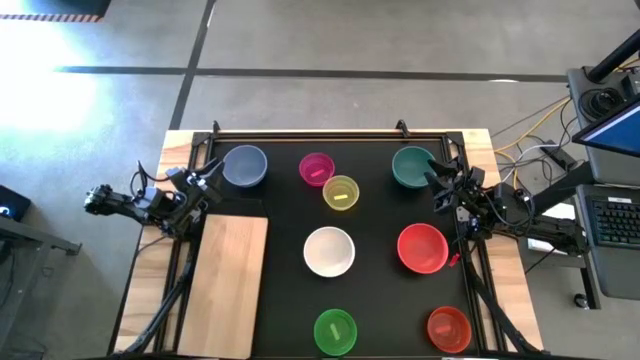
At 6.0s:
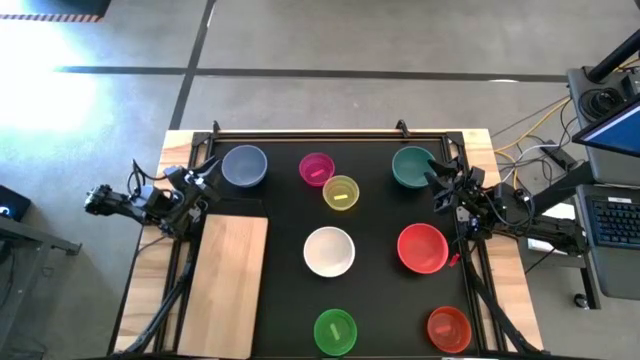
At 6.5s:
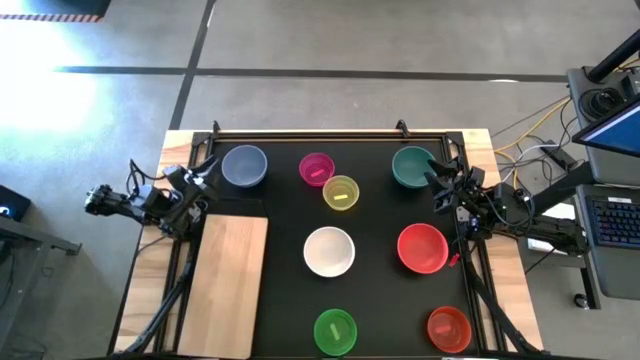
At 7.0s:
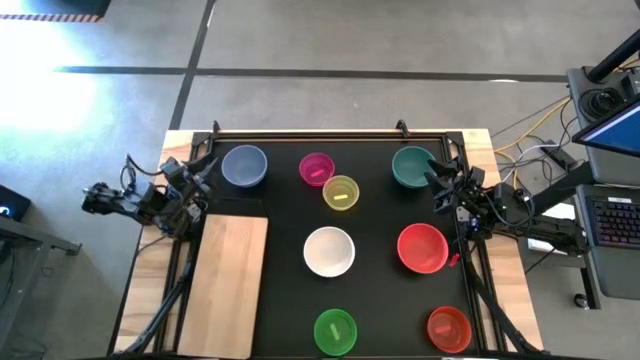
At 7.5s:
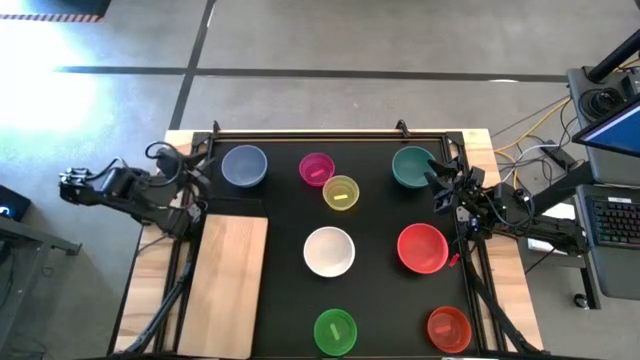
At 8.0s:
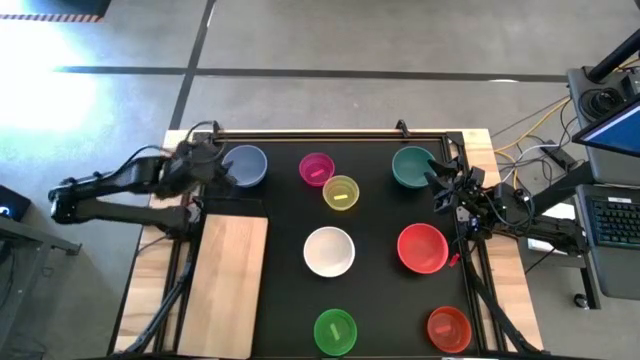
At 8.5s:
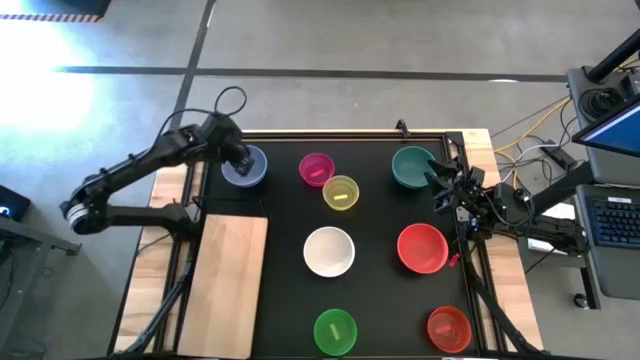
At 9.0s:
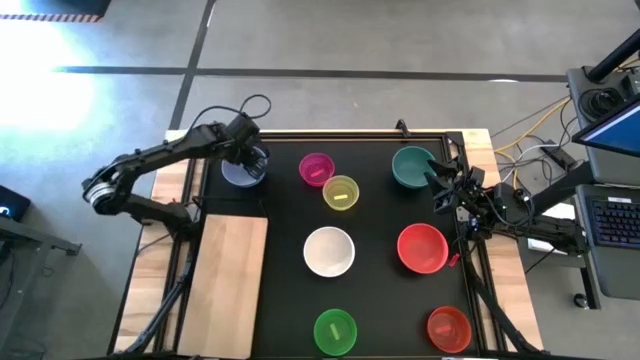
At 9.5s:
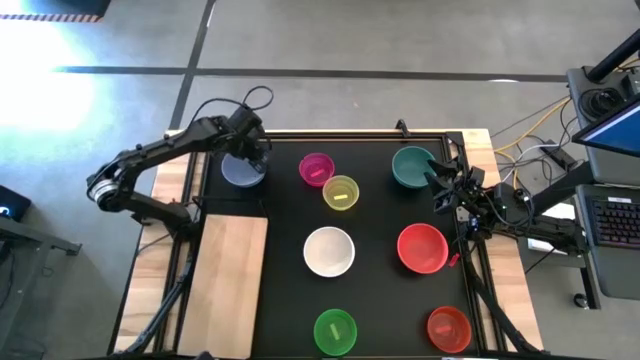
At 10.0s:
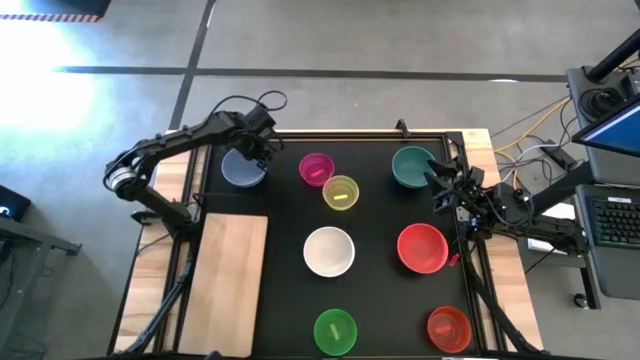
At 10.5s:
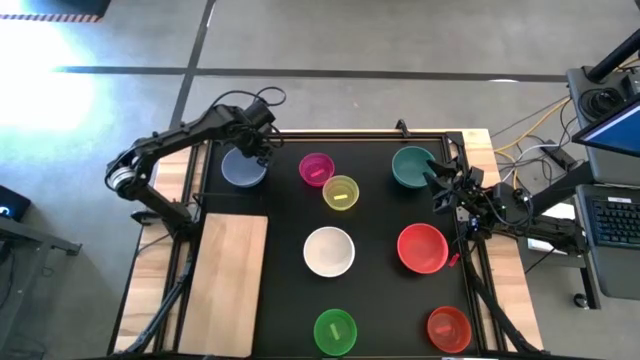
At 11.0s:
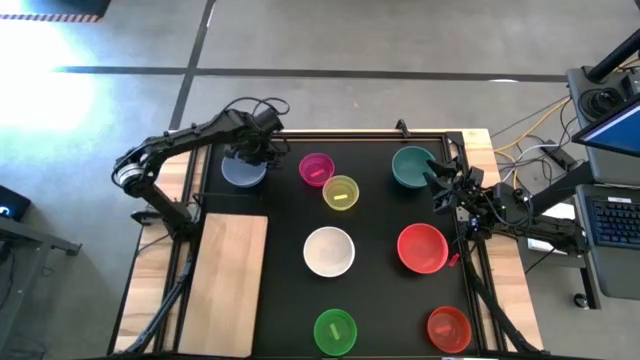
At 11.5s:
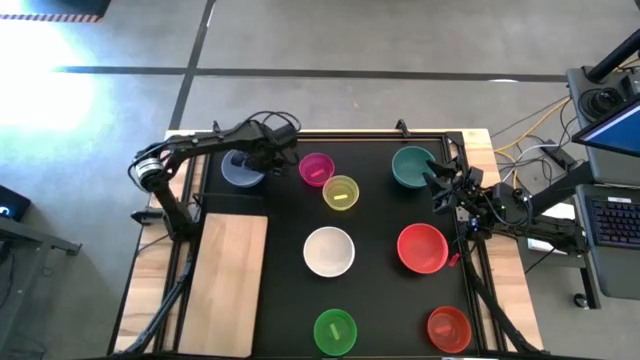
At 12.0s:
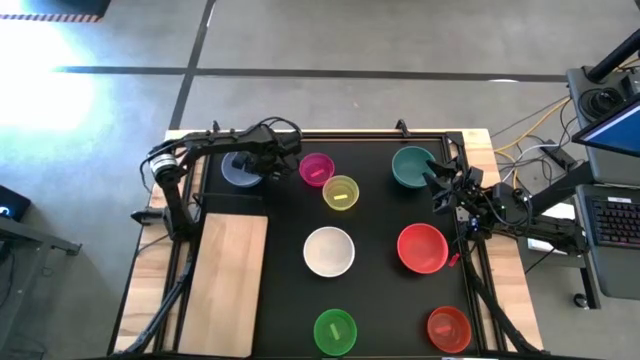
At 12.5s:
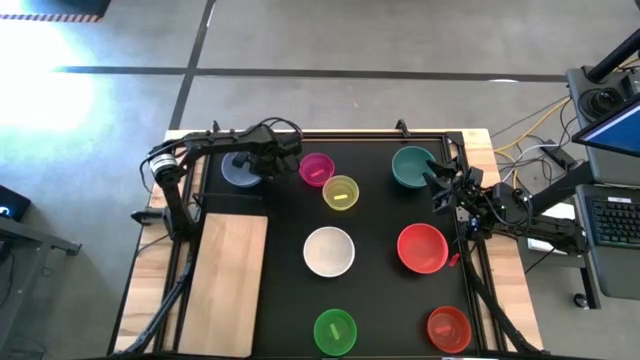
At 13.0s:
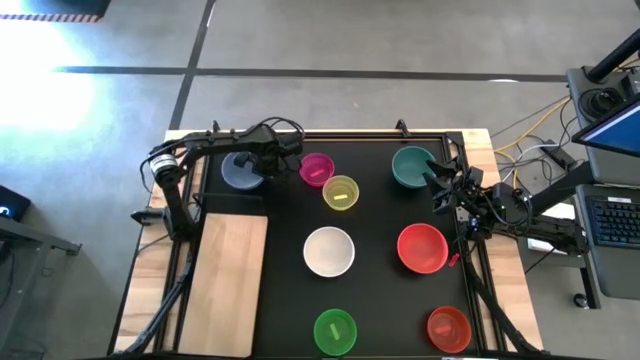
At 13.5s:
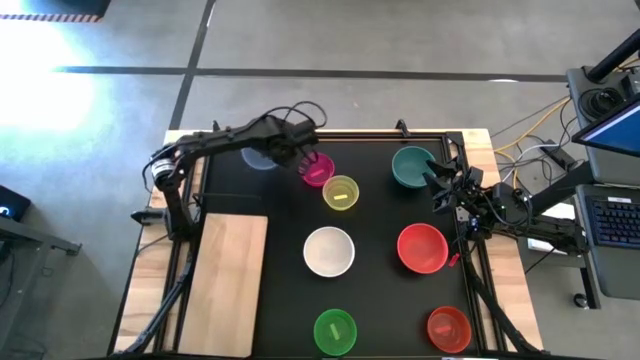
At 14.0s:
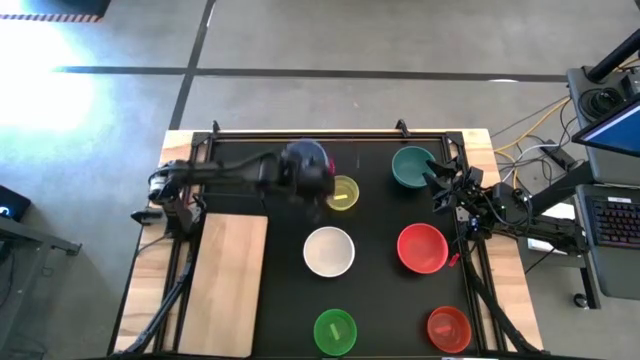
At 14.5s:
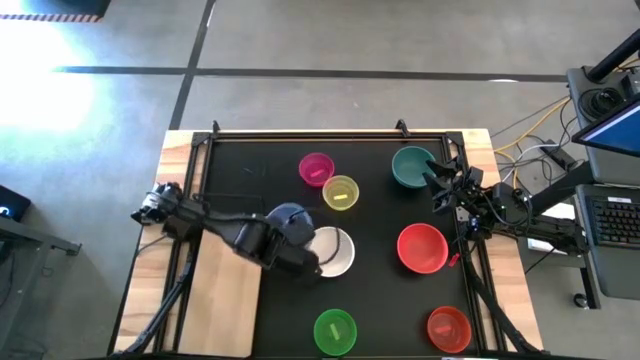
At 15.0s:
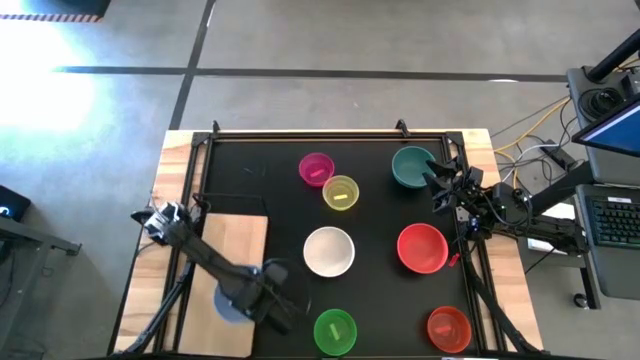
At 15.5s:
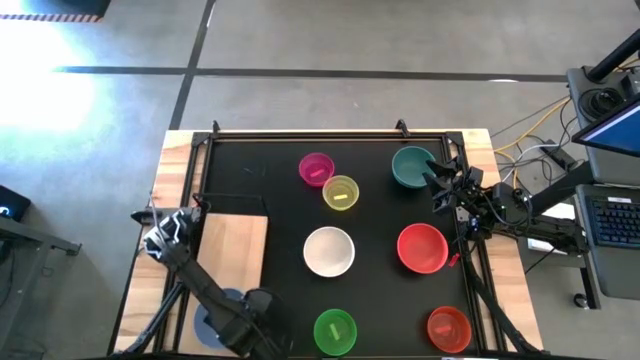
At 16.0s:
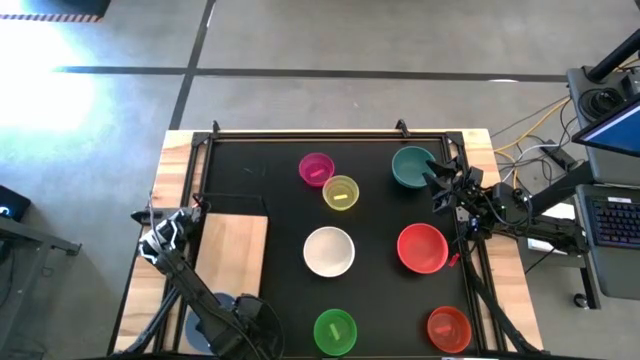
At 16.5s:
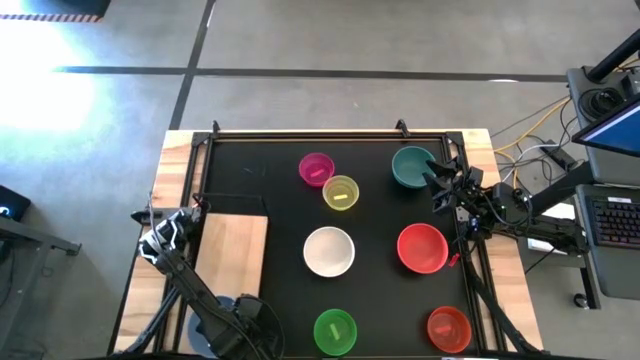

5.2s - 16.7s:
Task: Place and stack bowls onto a shelf
Put the blue bowl on the shelf

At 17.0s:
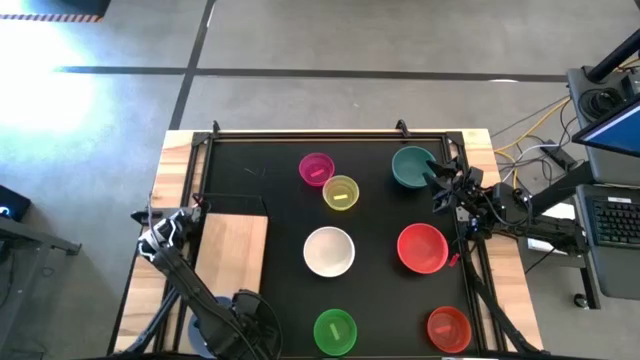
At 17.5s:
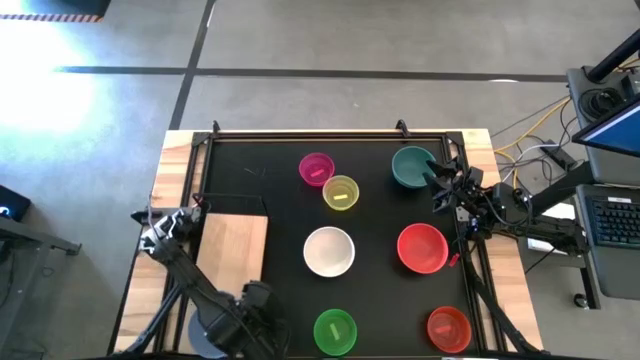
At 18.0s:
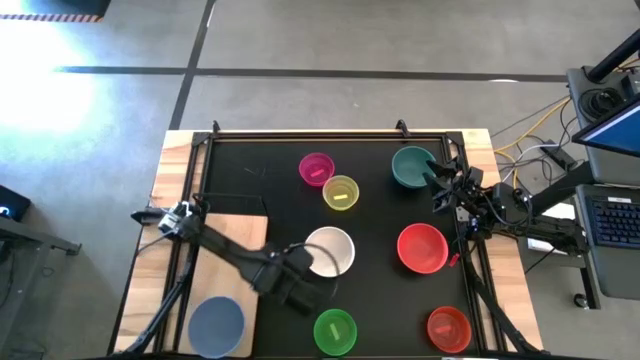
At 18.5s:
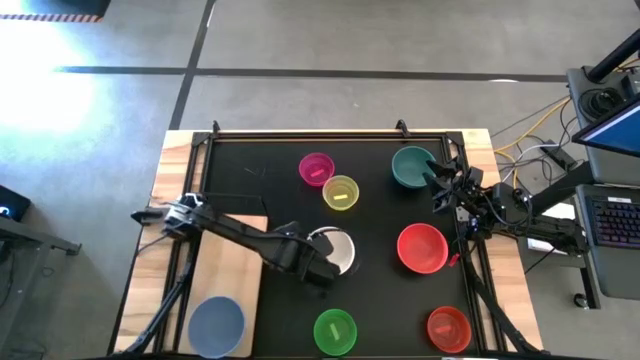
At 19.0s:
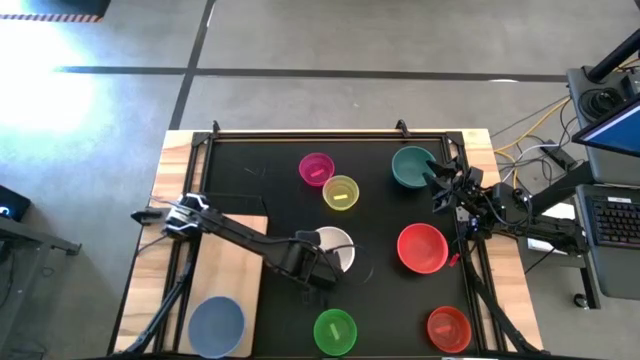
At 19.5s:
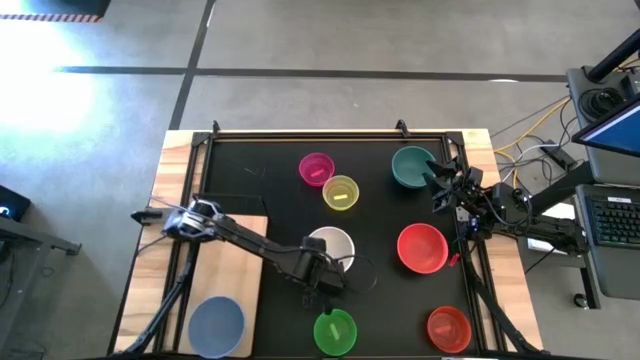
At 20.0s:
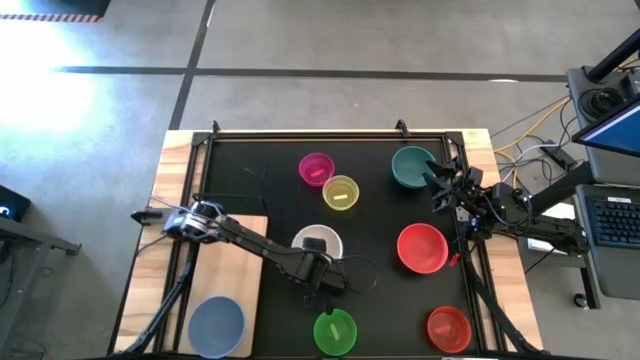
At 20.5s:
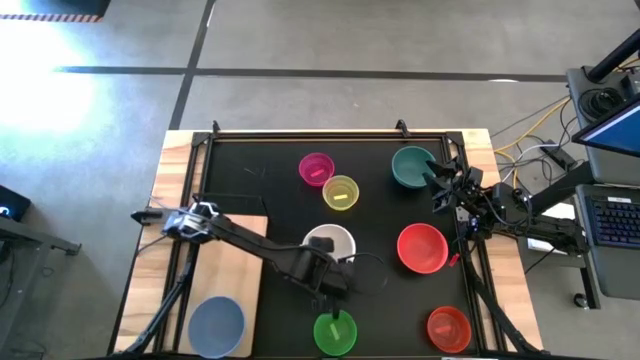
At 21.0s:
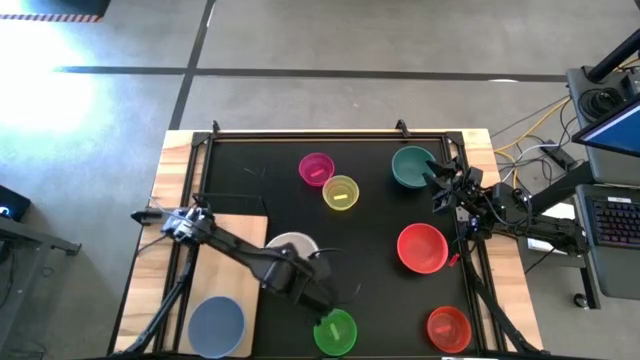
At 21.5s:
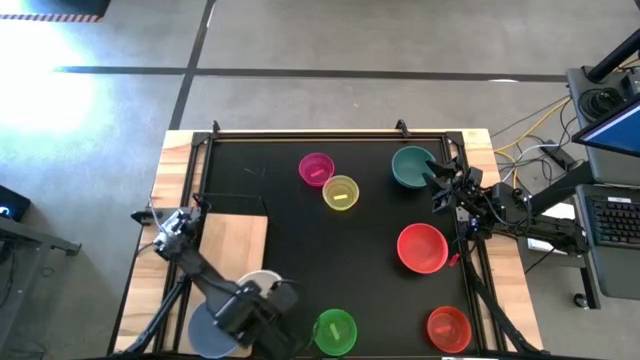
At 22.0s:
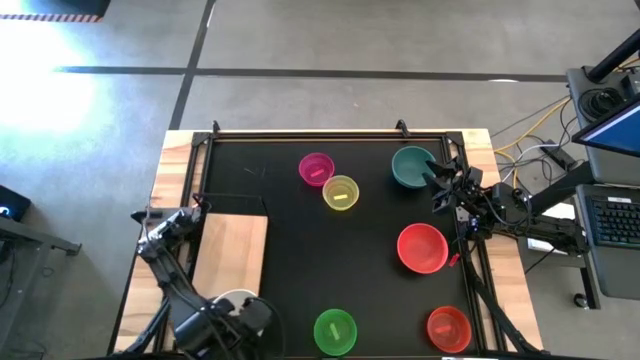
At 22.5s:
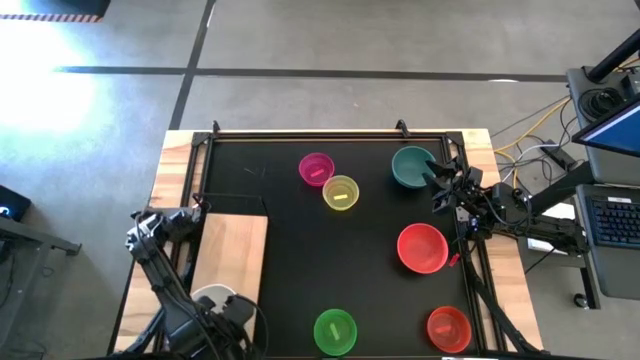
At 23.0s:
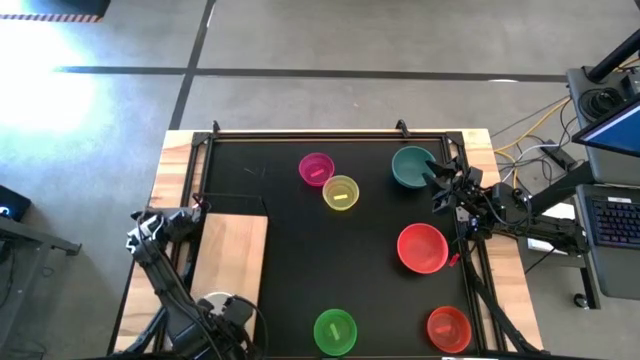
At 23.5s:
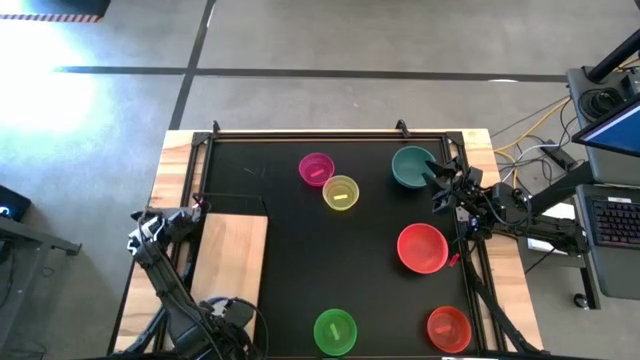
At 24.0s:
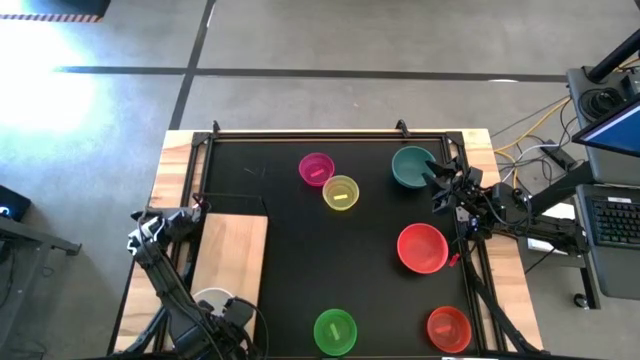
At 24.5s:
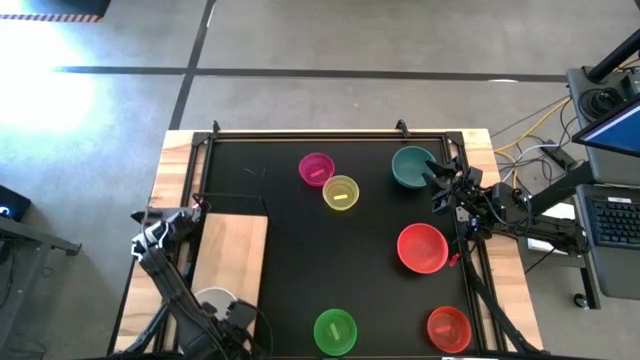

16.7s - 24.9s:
Stack the white bowl on top of the blue bowl on the shelf

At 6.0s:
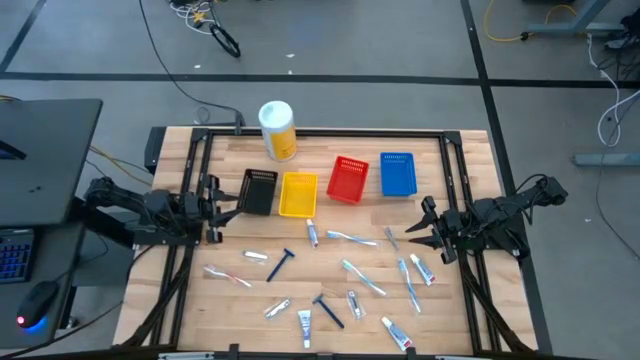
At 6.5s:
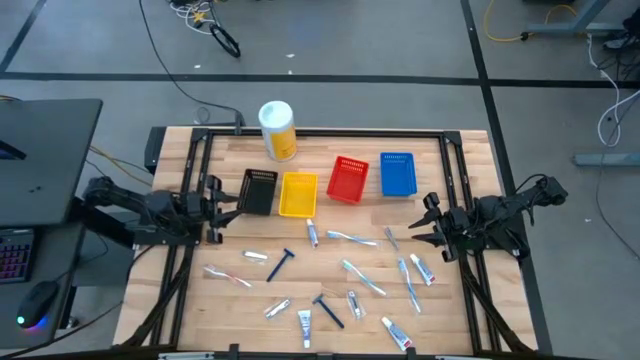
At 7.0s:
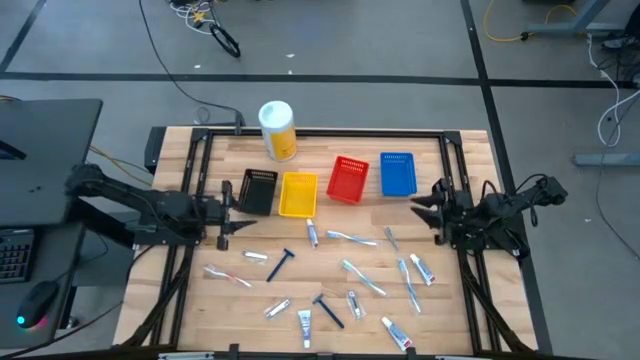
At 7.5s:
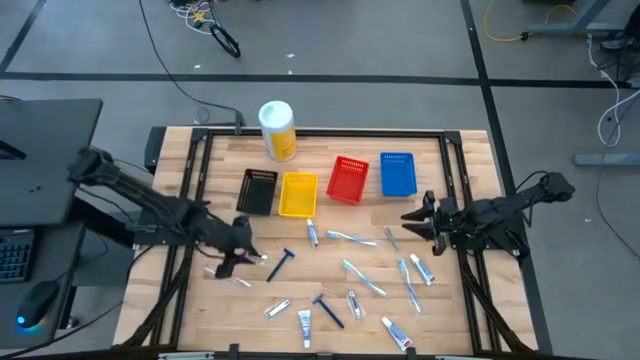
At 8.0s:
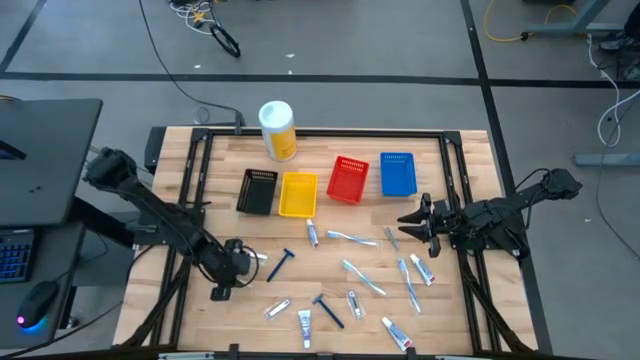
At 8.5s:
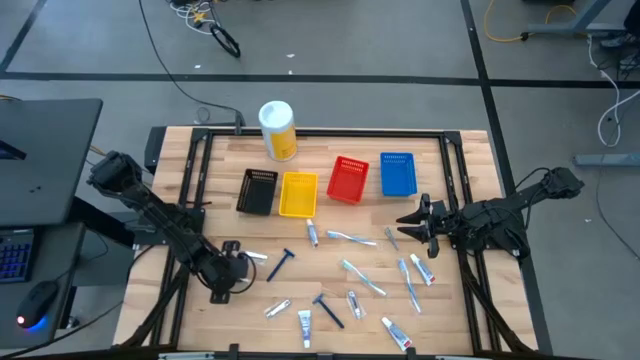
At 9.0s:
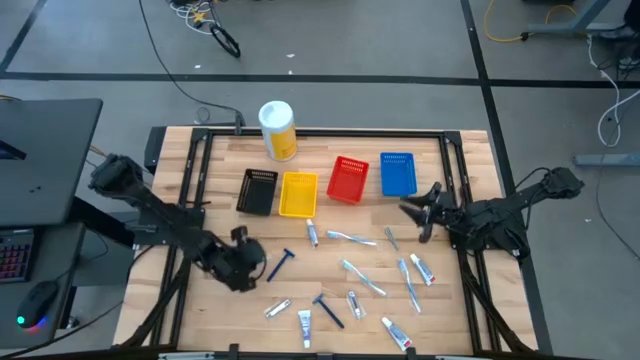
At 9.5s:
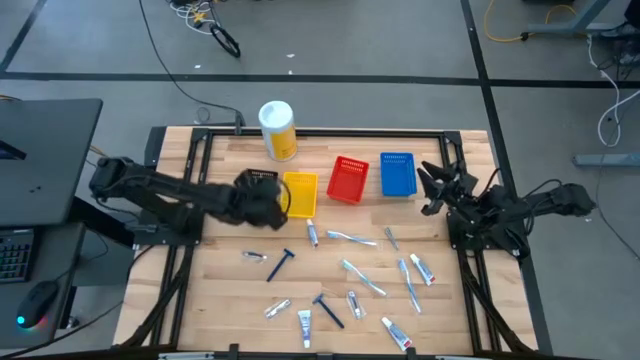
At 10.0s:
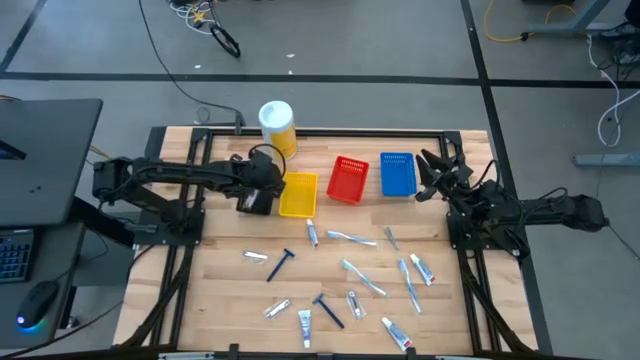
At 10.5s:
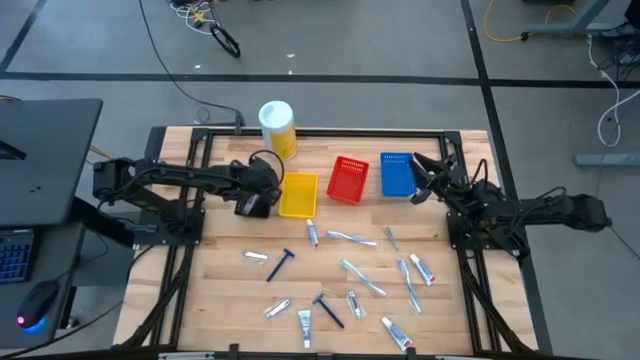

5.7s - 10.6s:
Task: Pick & Place Travel size toiletries
Put the orange toothbrush into the black bin
